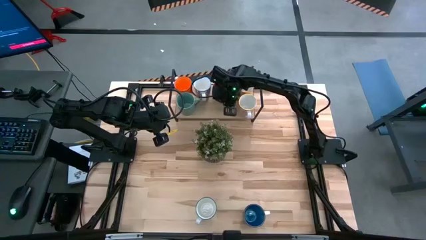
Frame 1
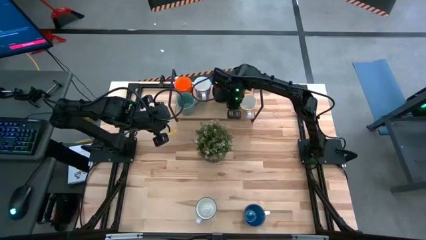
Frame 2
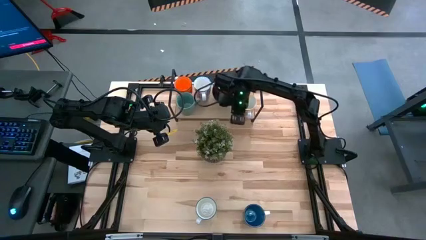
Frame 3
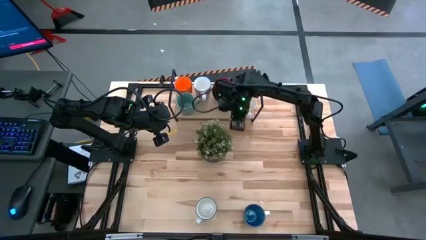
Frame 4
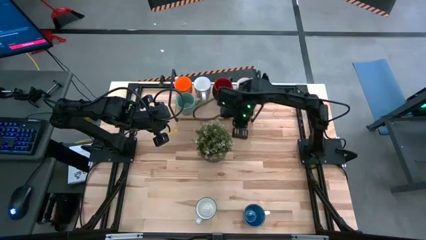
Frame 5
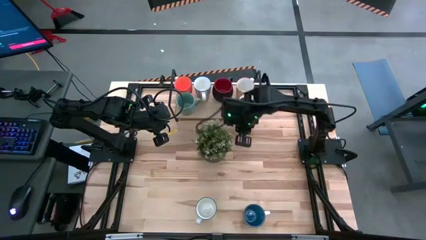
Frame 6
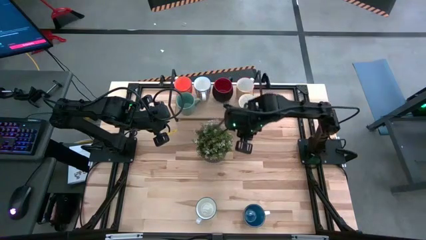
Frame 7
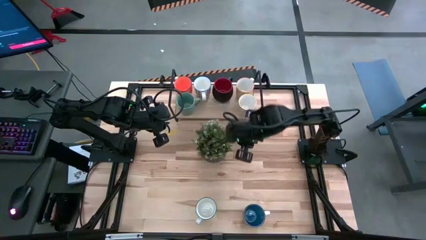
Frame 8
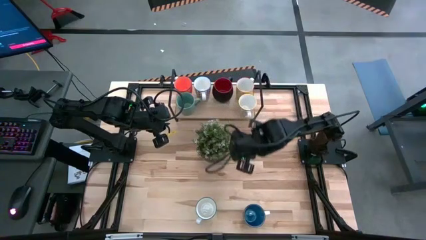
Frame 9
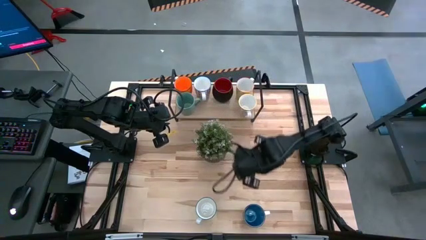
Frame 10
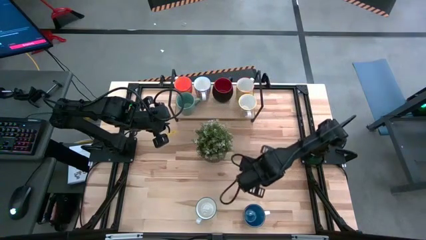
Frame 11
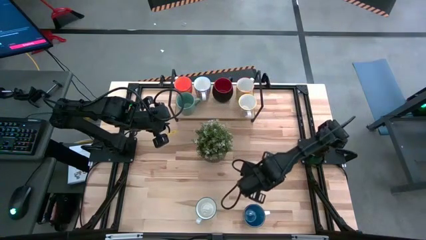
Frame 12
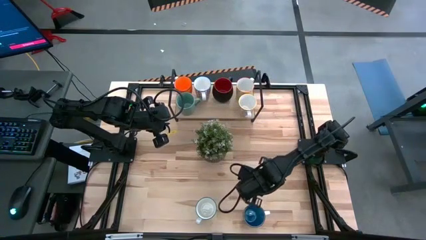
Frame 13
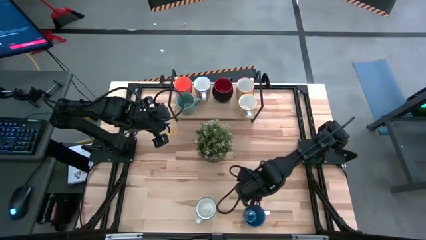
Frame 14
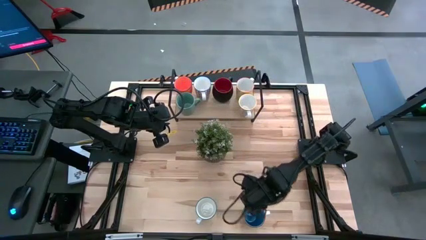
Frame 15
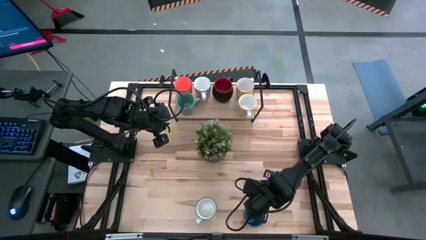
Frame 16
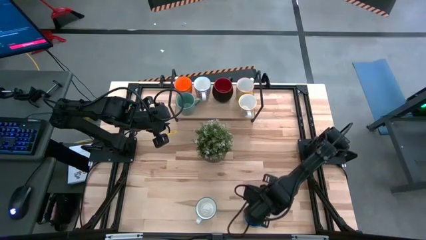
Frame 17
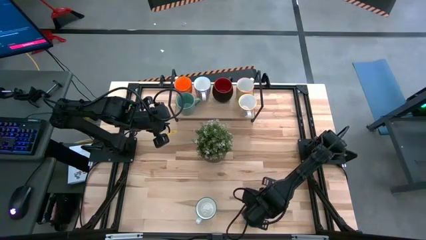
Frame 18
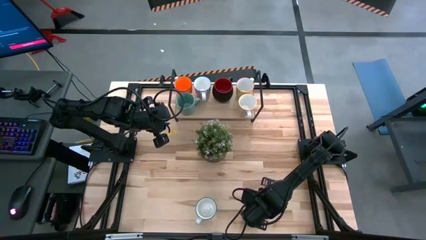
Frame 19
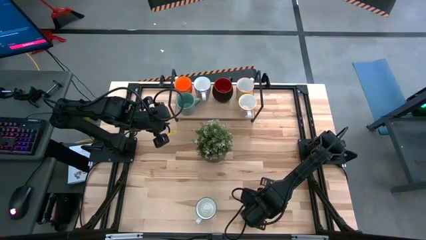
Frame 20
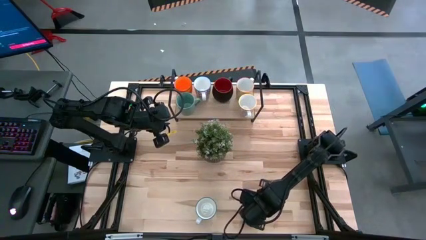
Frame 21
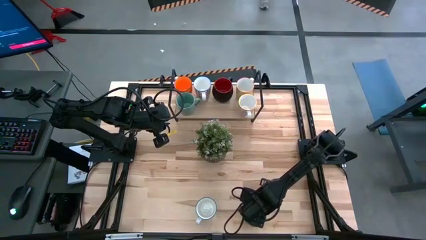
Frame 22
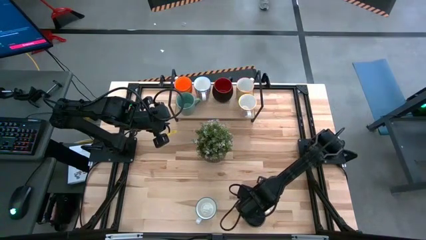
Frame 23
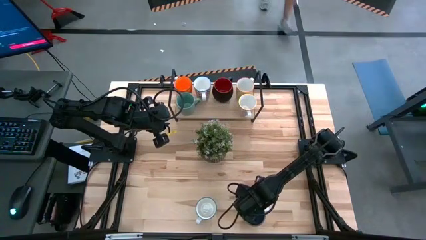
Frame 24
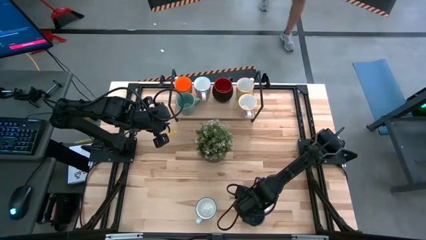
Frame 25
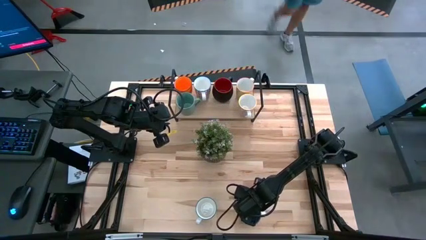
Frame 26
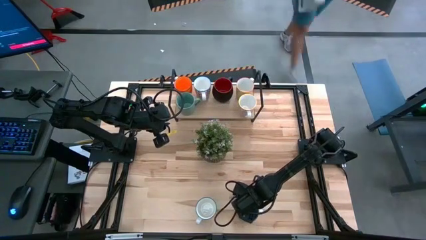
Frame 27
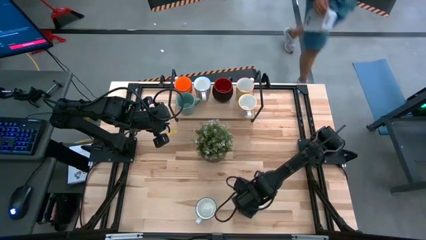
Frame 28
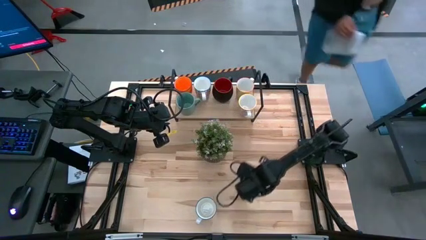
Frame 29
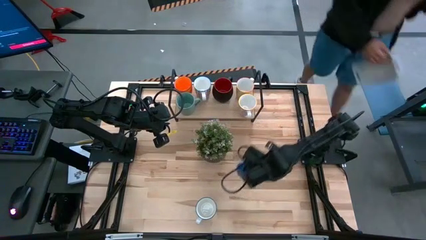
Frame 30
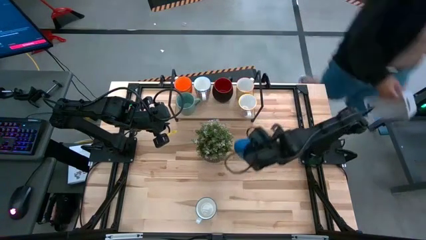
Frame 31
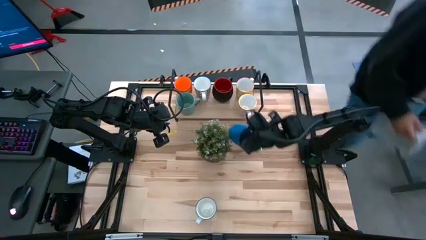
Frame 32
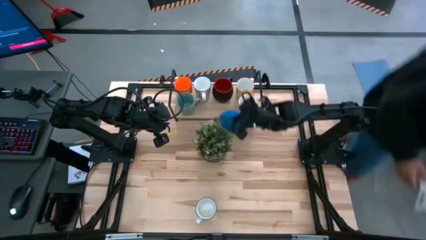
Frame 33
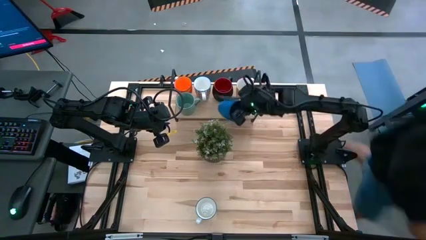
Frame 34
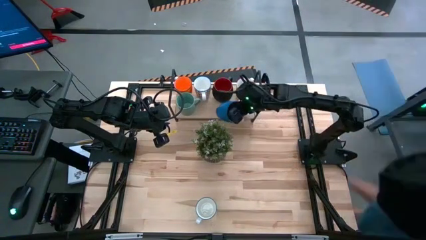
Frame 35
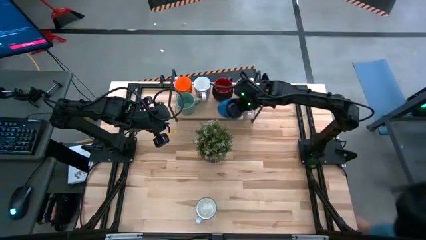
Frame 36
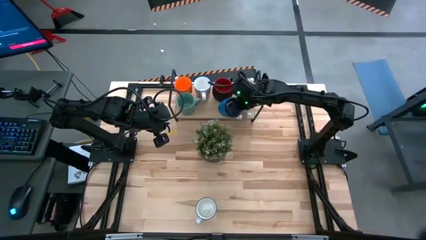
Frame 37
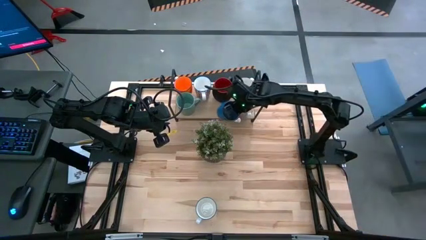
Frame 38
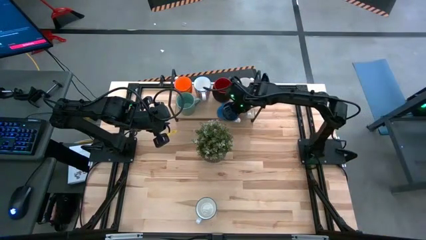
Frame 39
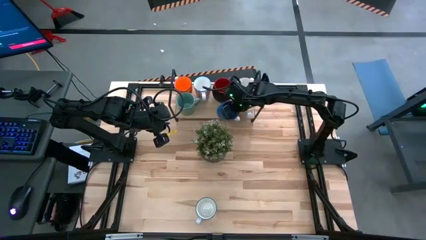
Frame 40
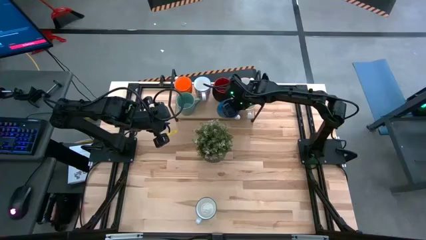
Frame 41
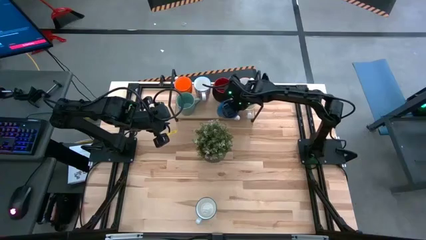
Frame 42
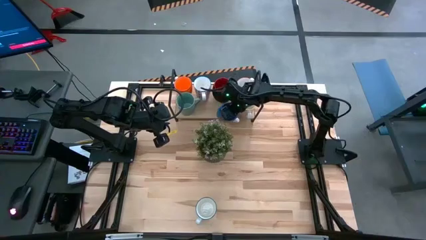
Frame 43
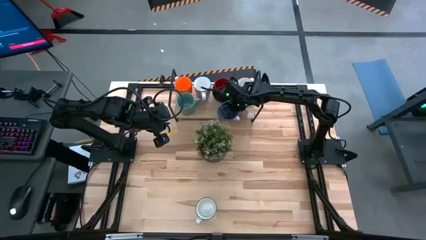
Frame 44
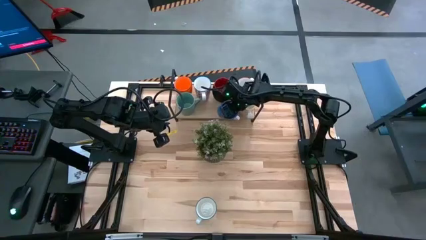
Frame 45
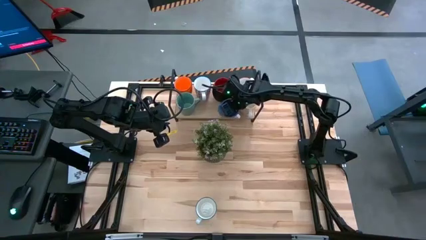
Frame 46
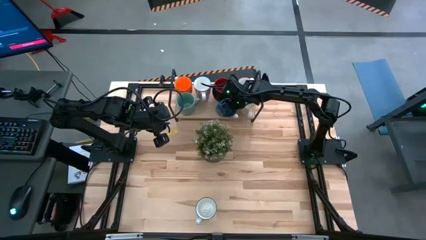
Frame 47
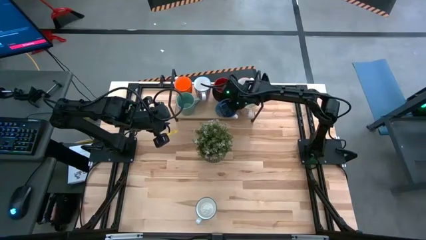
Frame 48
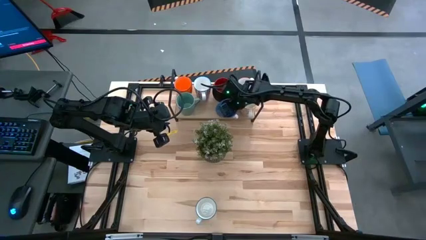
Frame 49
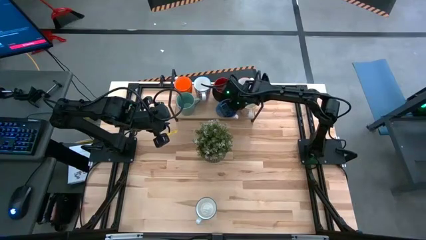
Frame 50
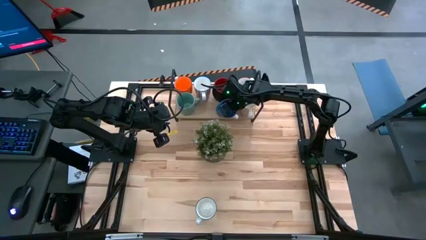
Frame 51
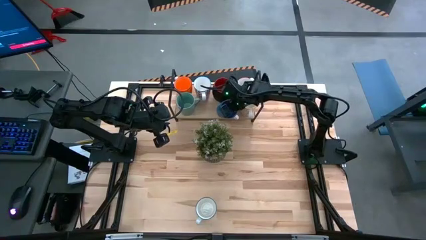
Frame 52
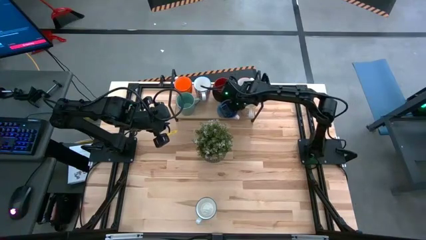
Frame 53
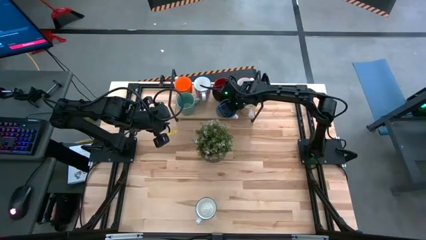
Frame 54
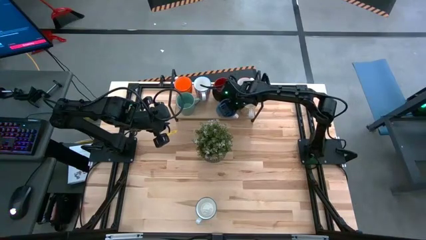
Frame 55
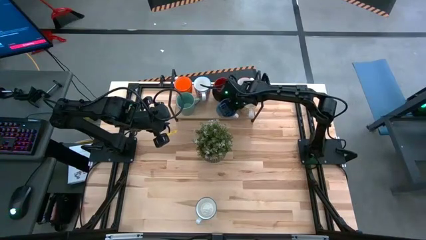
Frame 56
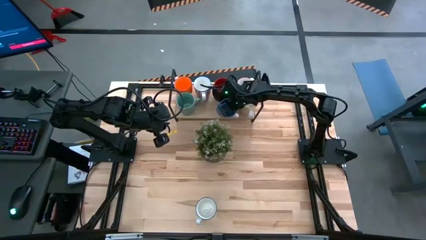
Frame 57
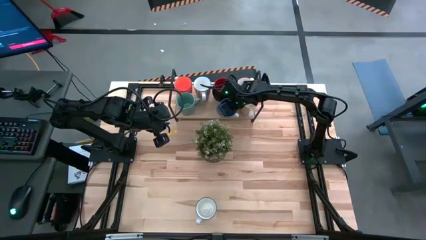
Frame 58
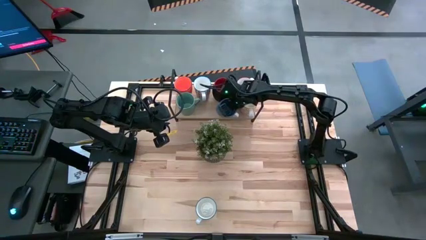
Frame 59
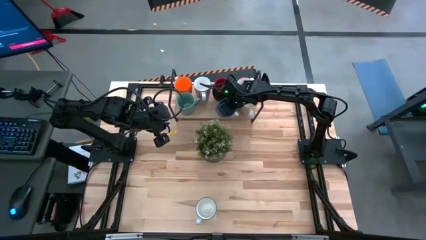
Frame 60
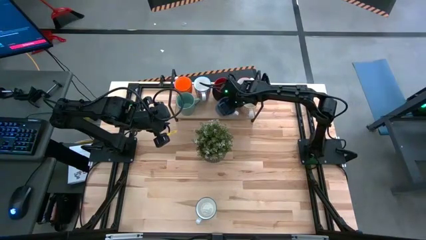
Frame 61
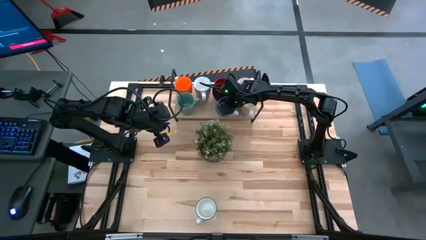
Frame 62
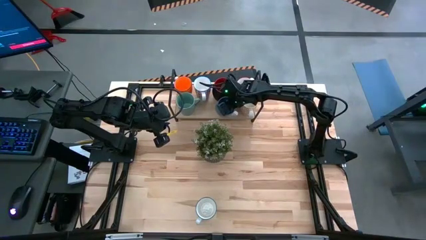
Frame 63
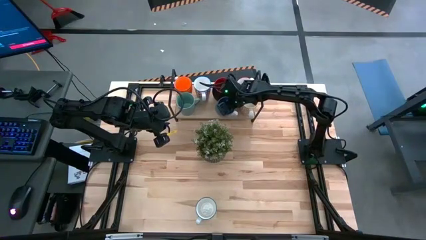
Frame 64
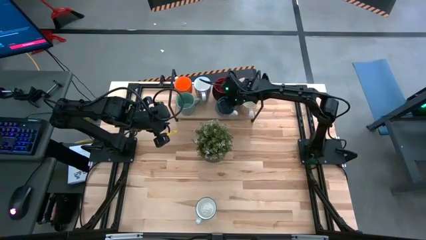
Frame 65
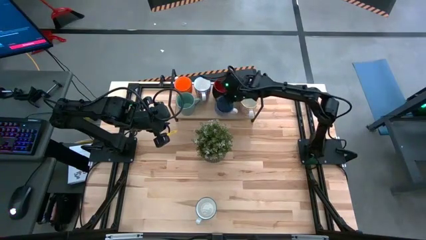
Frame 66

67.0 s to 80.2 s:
Task: Place coffee mugs
Put the blue mug on the shelf

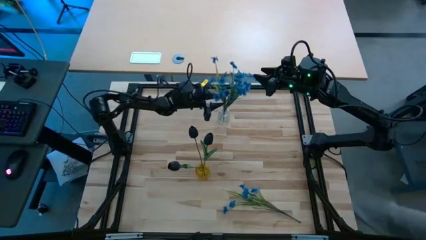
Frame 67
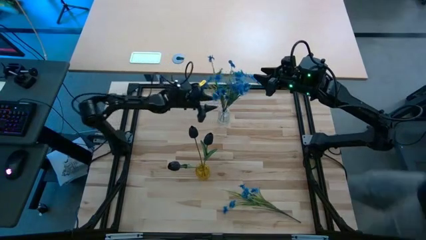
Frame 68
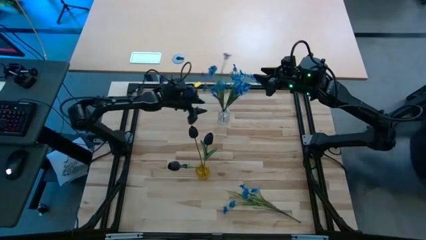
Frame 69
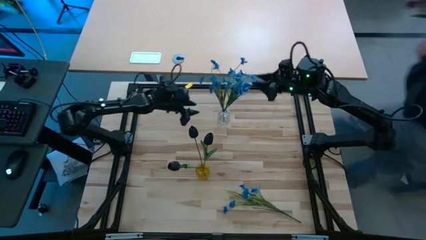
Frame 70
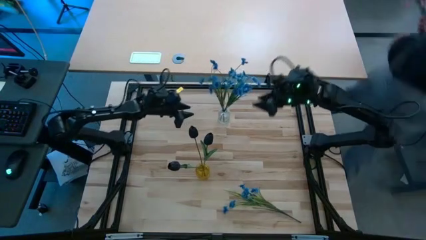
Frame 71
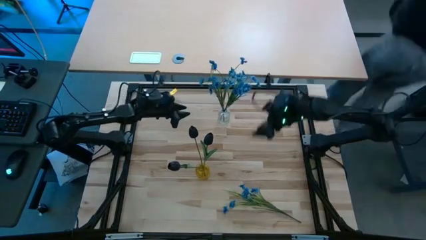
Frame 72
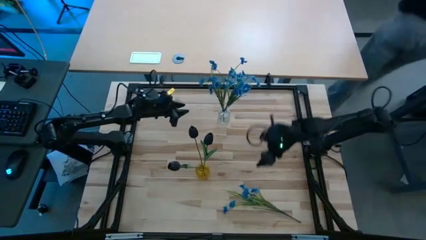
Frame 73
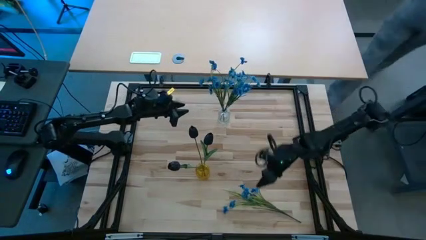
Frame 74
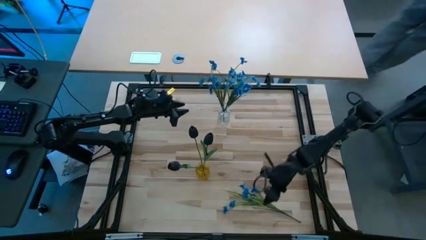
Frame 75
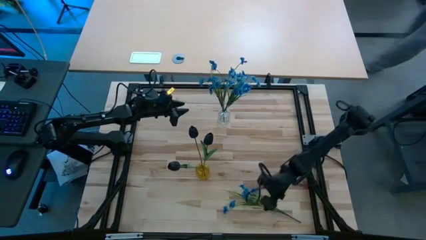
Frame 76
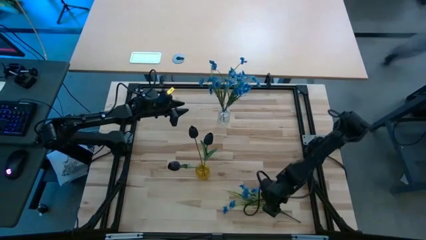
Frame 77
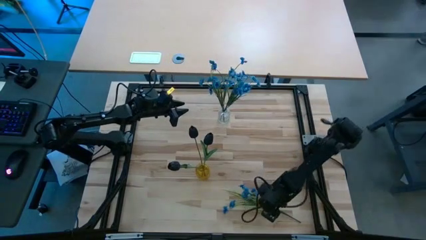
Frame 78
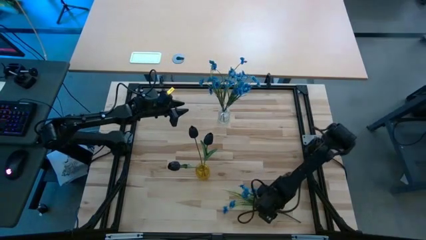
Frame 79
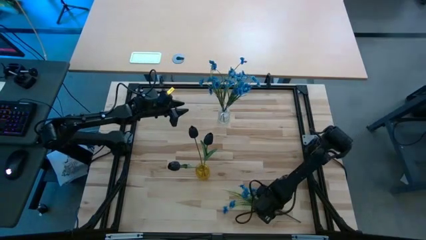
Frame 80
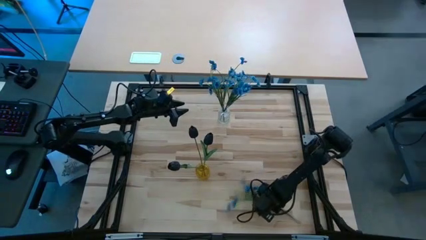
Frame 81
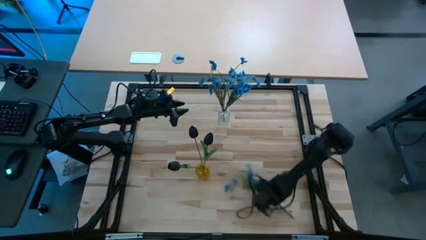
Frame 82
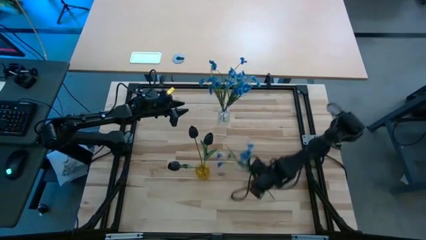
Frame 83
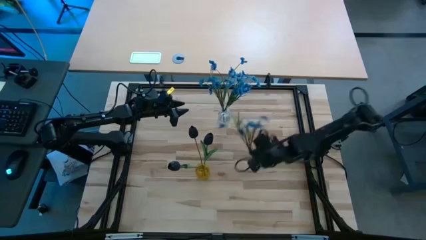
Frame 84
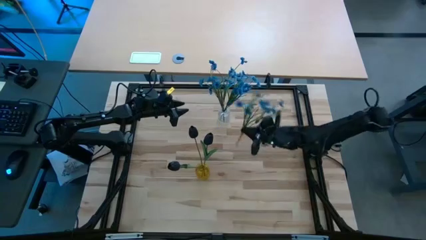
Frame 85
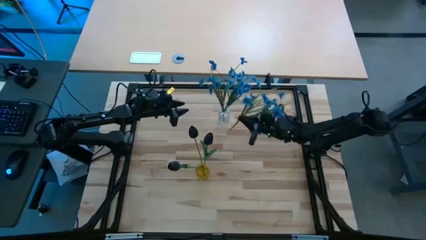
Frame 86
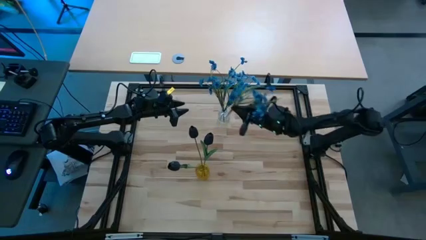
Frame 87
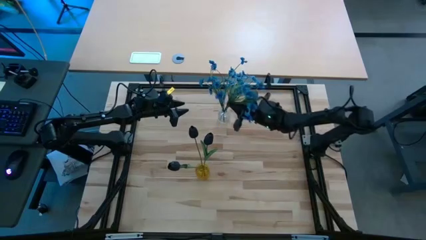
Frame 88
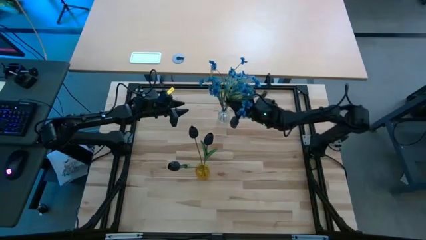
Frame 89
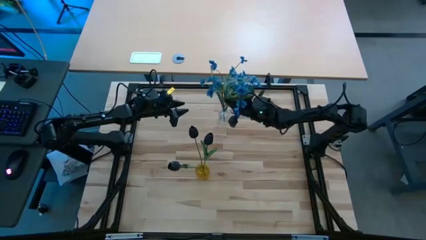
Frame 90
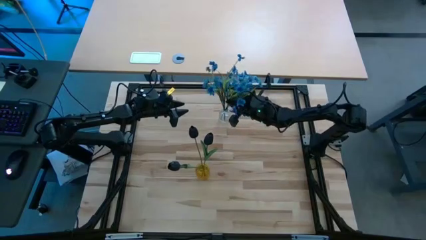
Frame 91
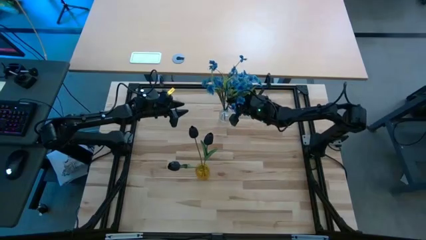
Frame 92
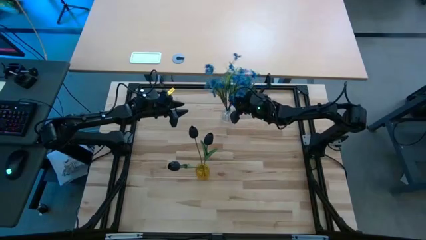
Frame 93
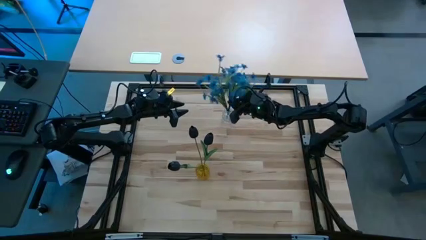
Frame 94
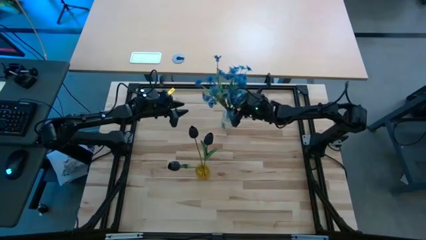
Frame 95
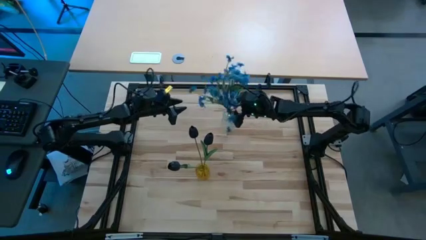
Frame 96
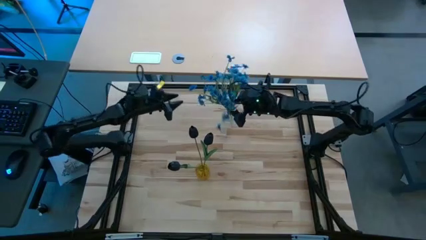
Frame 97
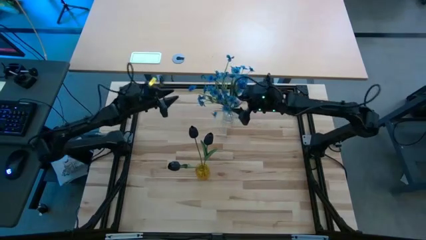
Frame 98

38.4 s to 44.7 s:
Task: Sort flowers into vase by color
Put the blue flowers into the transparent vase
